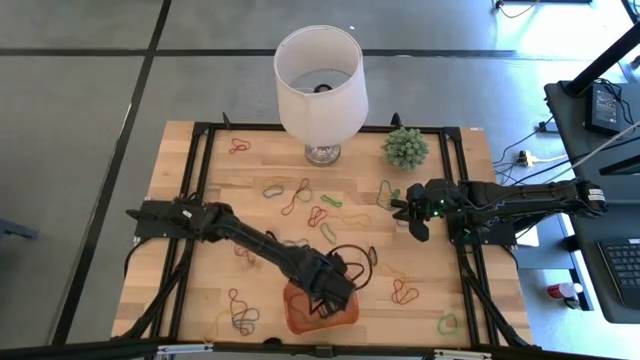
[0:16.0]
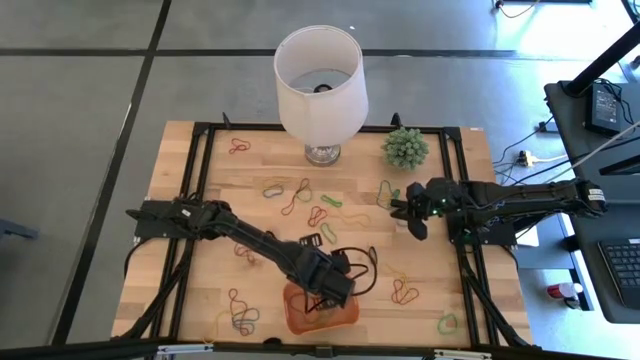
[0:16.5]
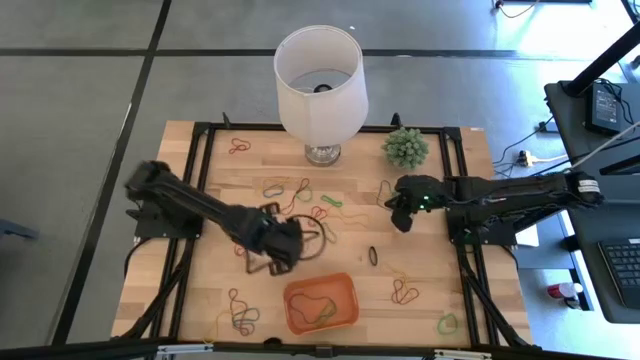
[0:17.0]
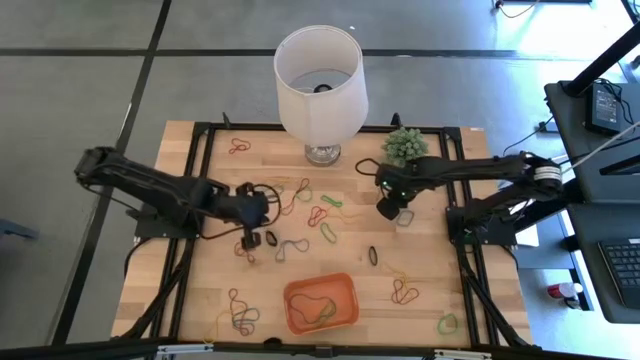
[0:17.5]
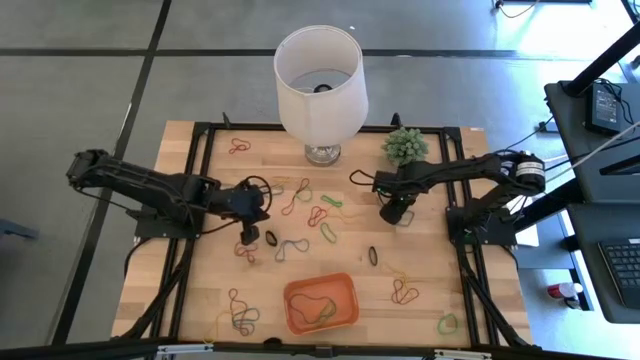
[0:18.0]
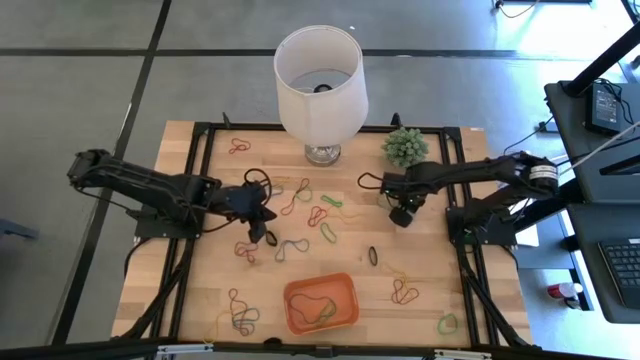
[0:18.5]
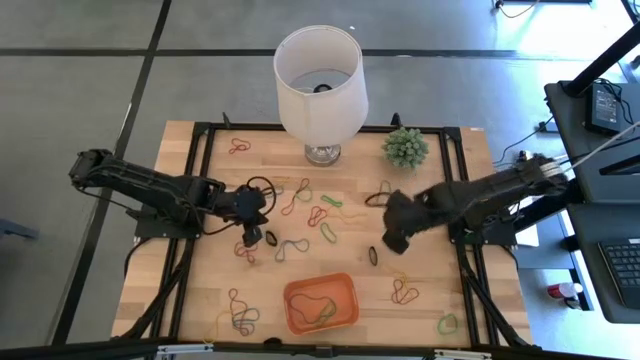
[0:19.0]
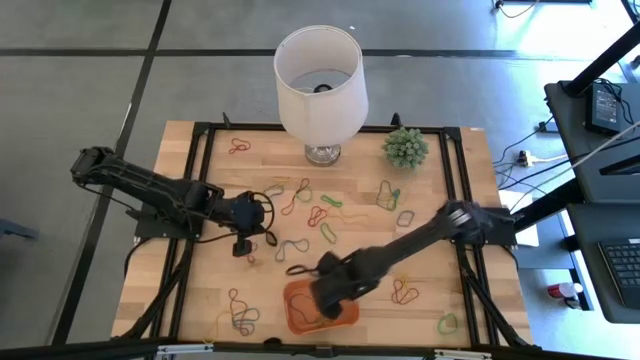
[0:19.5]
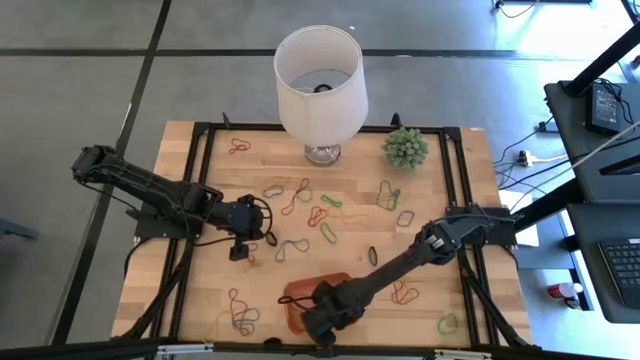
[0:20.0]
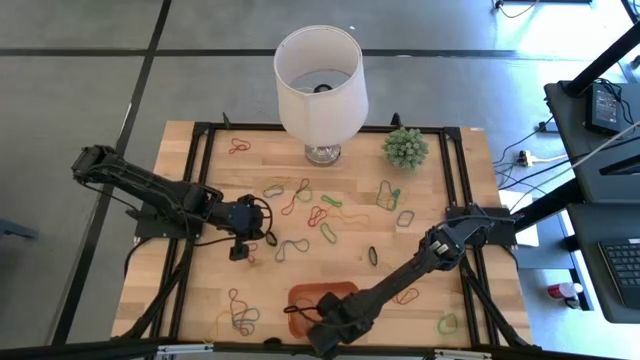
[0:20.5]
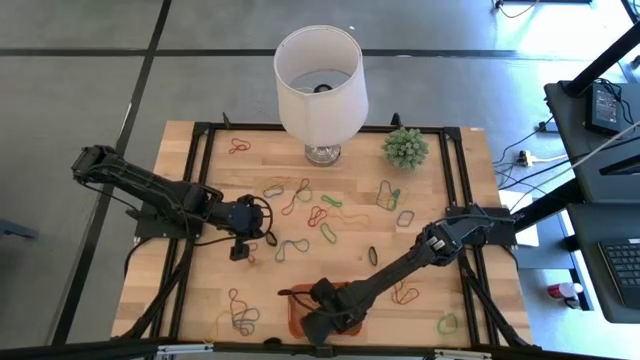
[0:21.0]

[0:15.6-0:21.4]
Task: Pick and place rubber bands into bin
Put the black rubber band into the orange bin

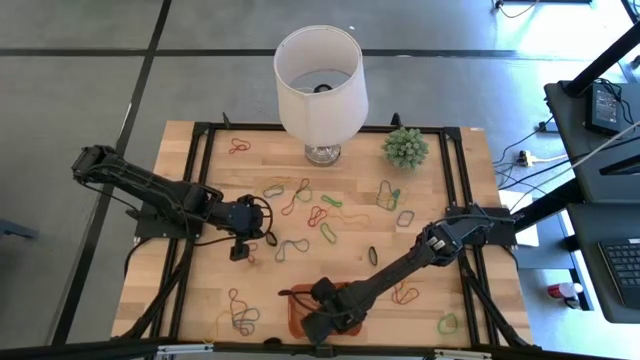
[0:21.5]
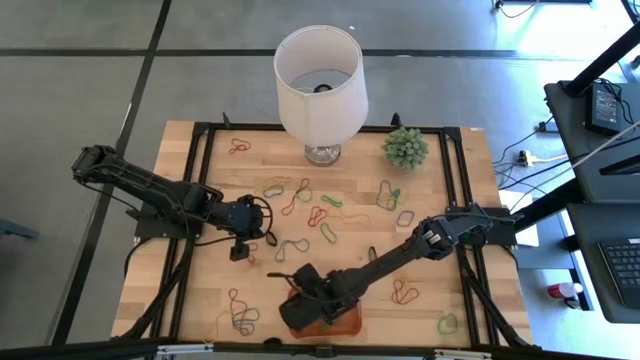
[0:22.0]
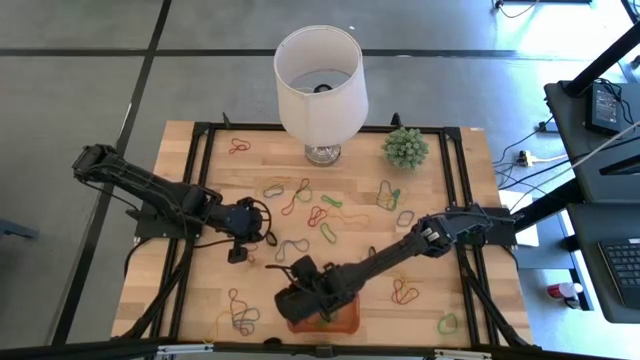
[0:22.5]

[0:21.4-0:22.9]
Adjust the orange bin

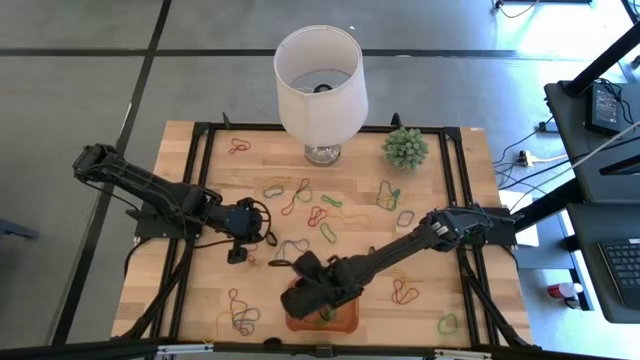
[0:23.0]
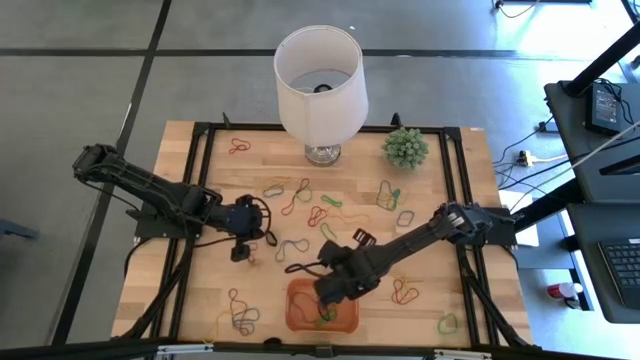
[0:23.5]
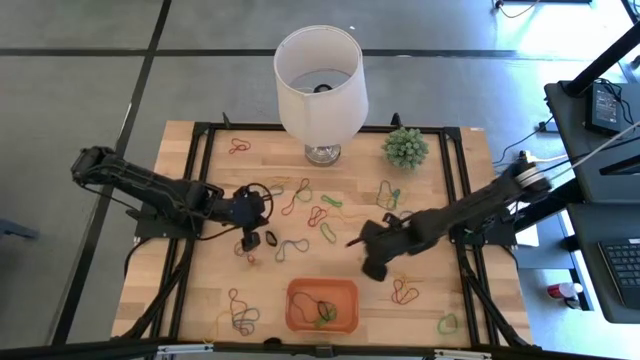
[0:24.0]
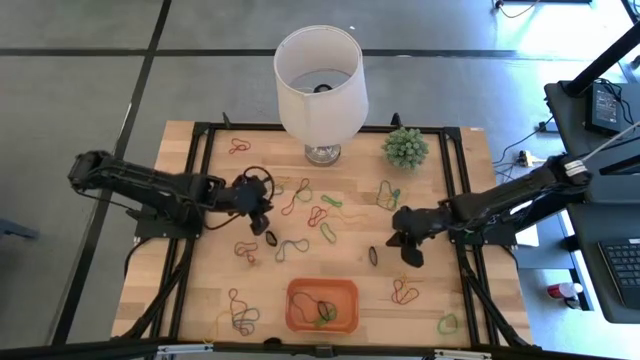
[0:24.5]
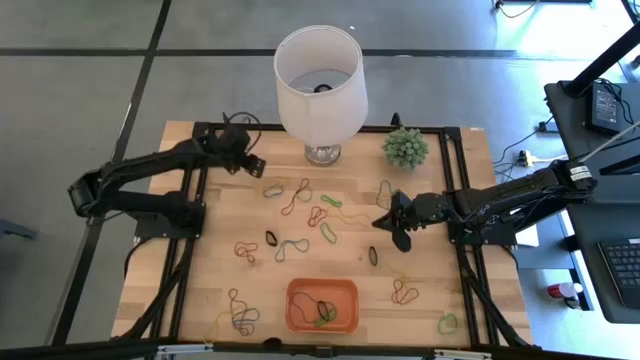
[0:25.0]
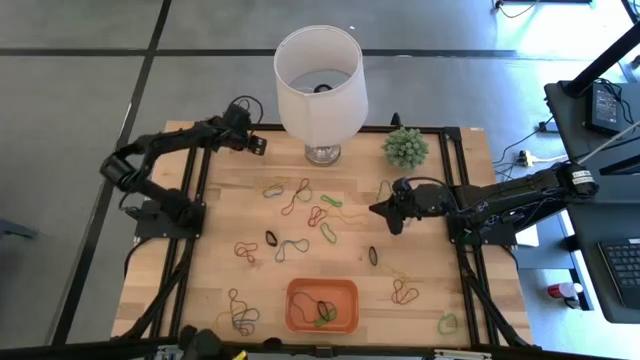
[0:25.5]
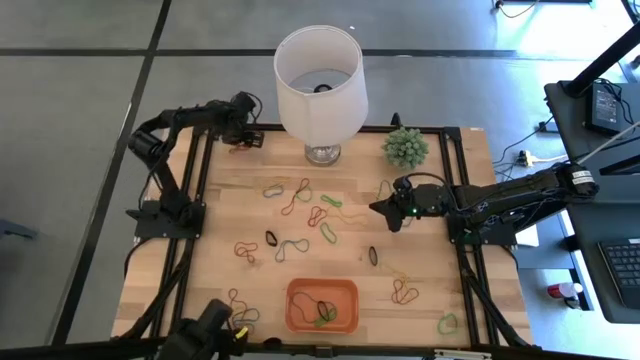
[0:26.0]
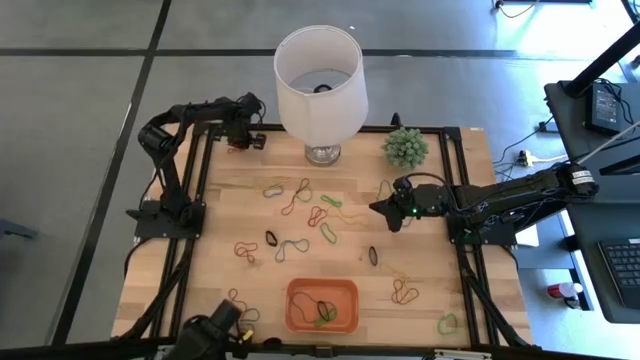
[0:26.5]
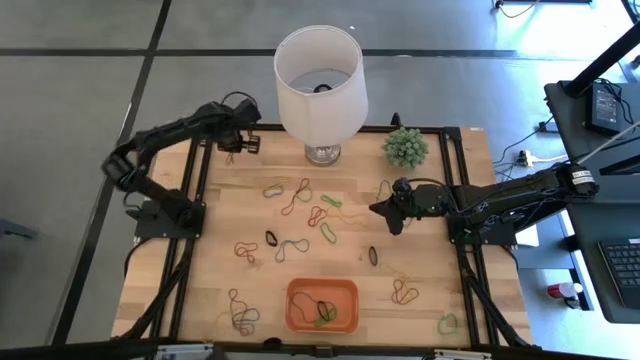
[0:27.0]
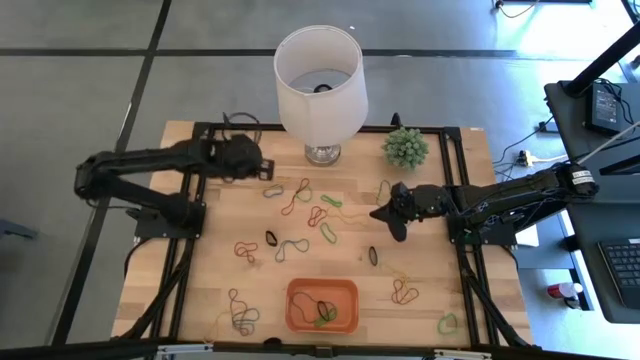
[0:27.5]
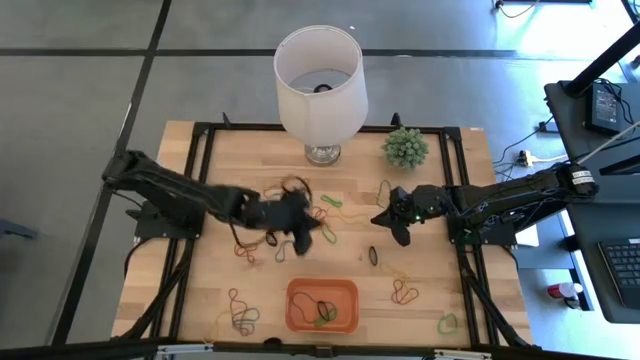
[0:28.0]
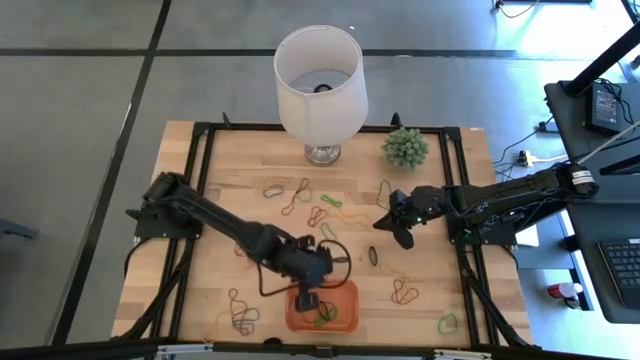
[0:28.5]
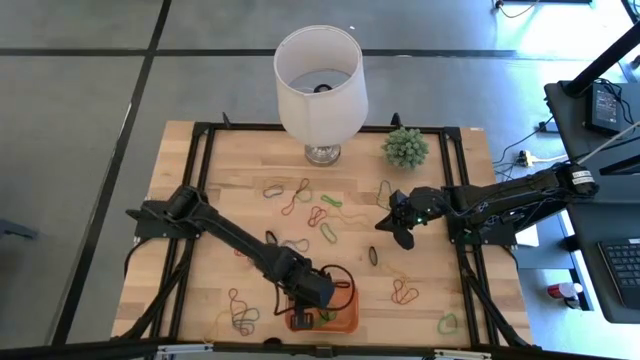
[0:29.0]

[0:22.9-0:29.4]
Put the red rubber band into the orange bin

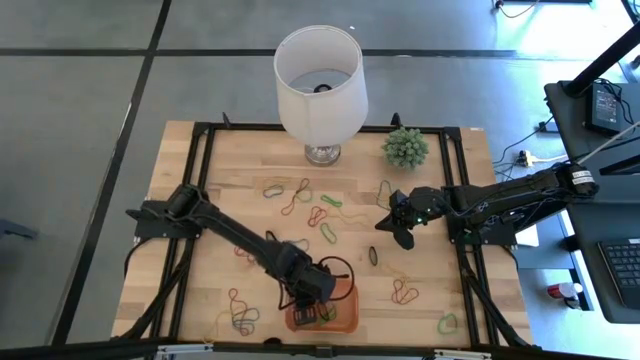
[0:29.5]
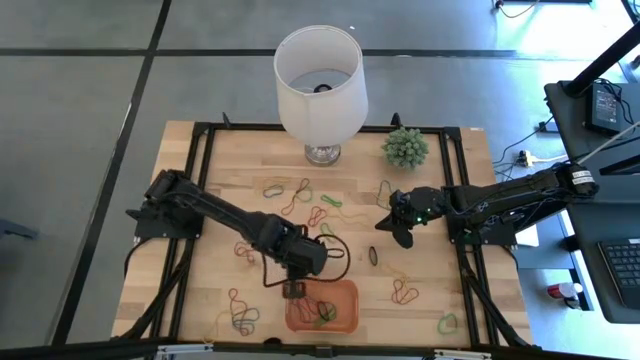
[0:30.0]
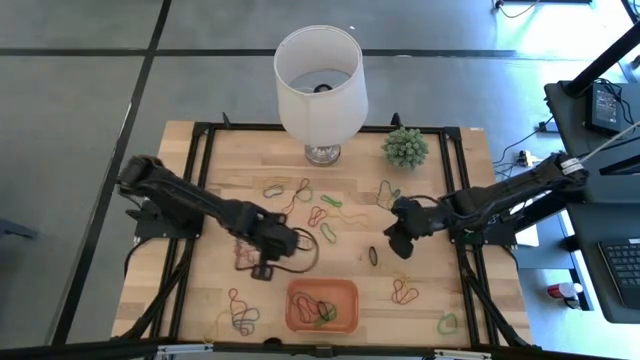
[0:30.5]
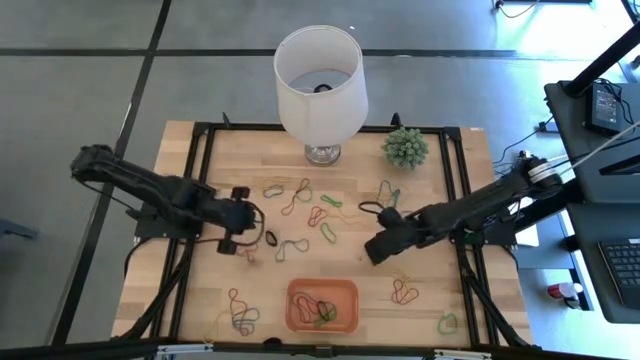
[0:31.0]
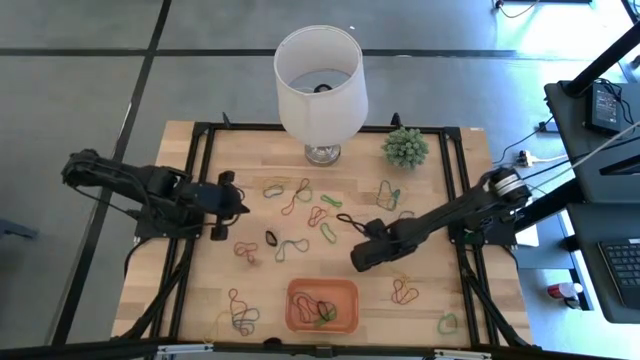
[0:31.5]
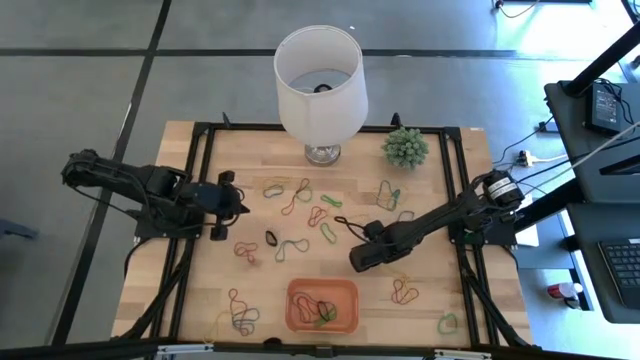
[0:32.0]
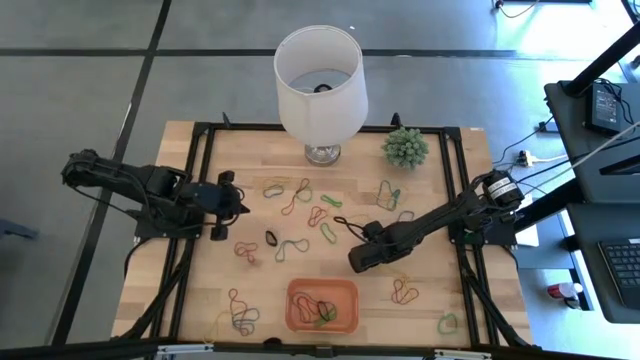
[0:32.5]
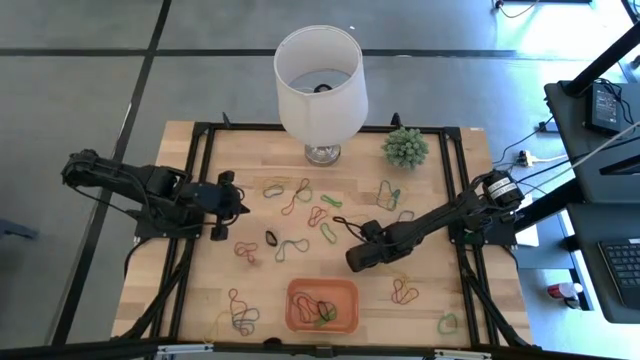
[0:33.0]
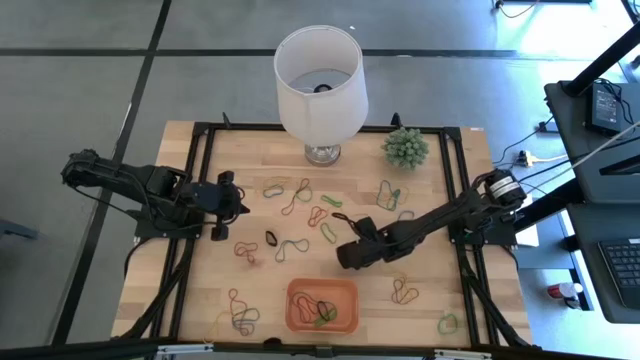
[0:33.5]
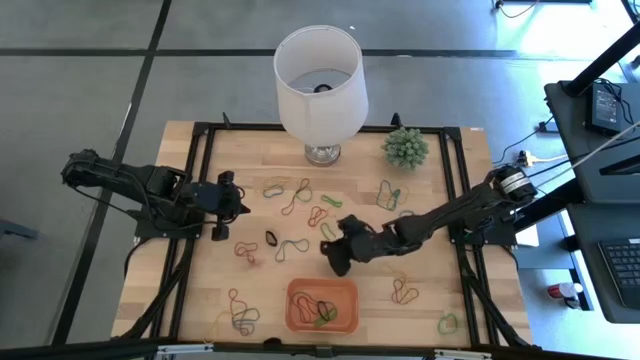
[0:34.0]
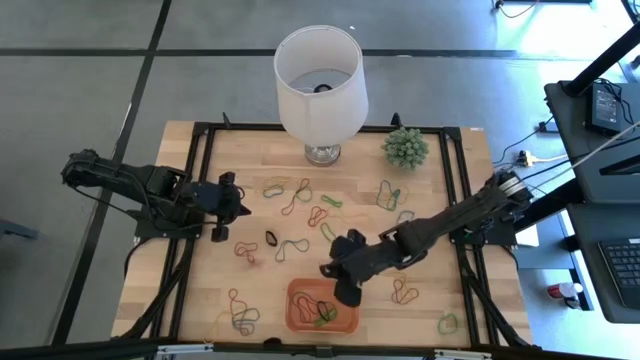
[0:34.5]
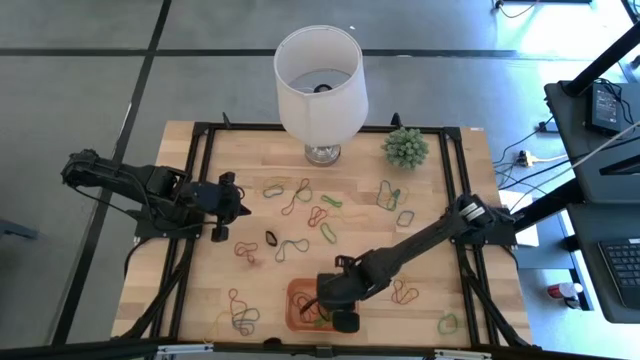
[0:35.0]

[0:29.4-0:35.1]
Put the black rubber band into the orange bin

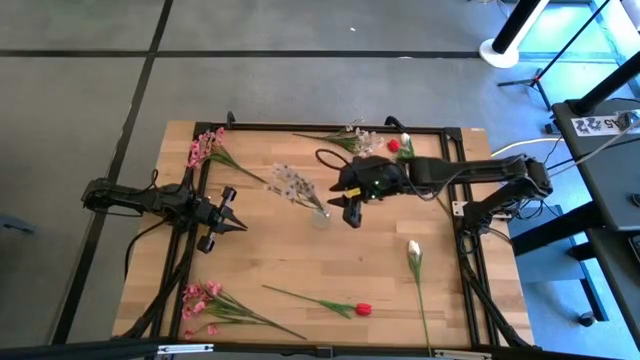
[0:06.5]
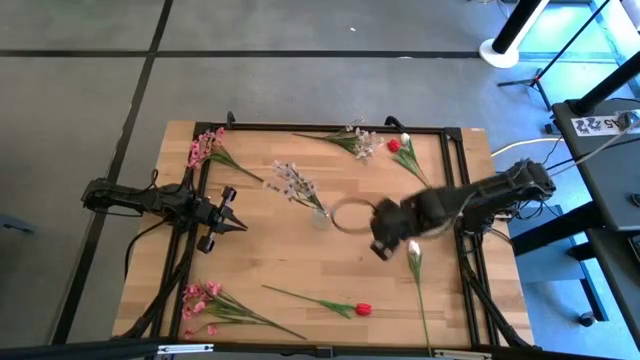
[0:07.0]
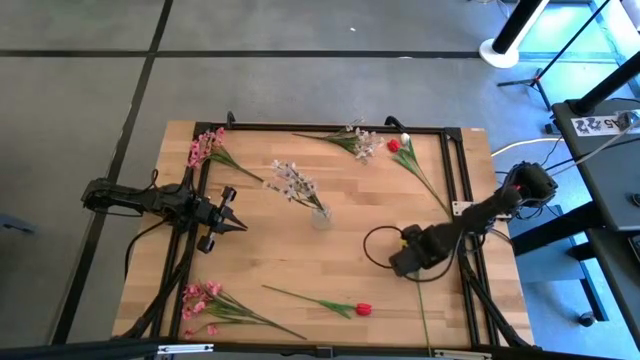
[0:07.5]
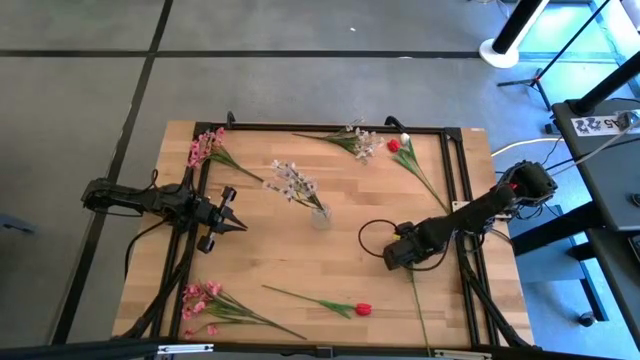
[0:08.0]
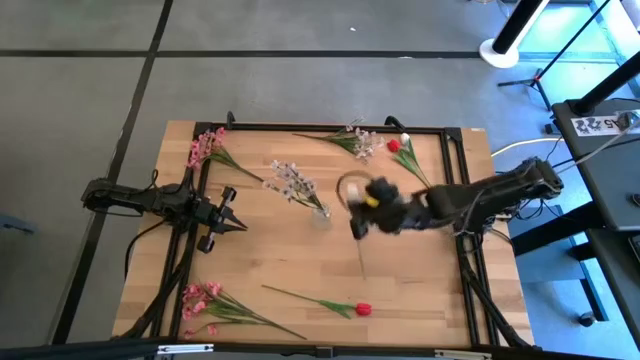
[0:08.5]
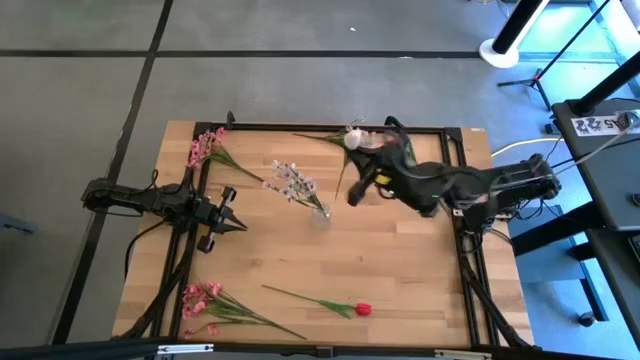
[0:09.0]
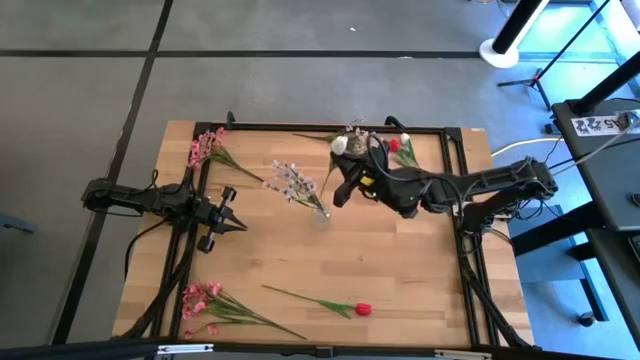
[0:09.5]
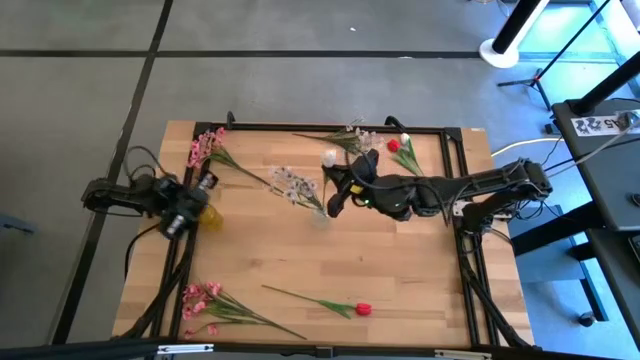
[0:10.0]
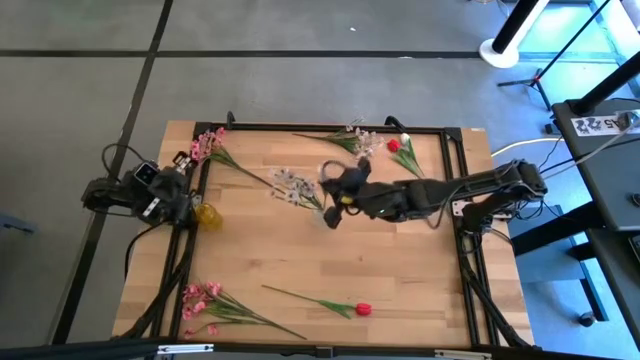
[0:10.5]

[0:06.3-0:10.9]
Task: Sort flowers into vase by color
Put the bottom white tulip into the transparent vase
